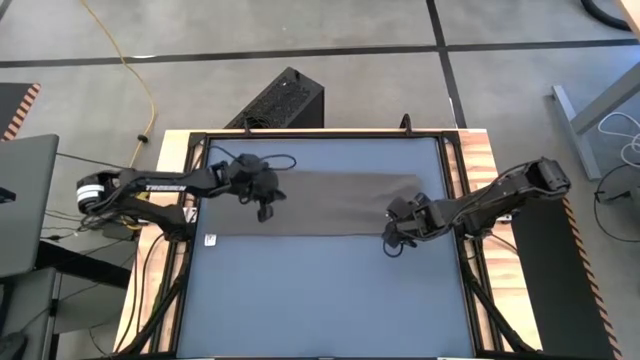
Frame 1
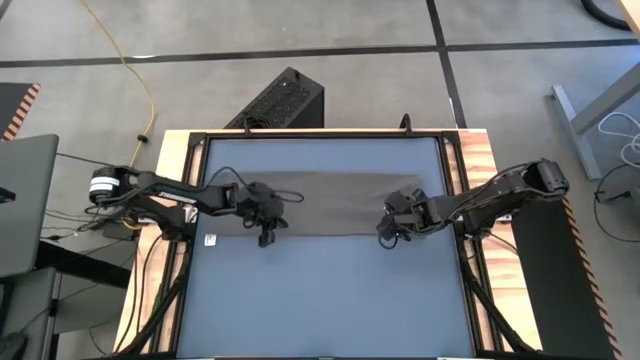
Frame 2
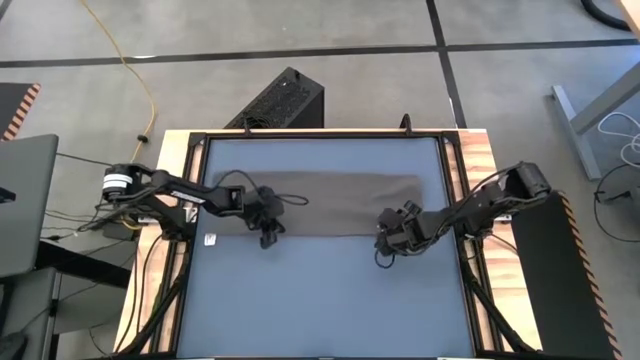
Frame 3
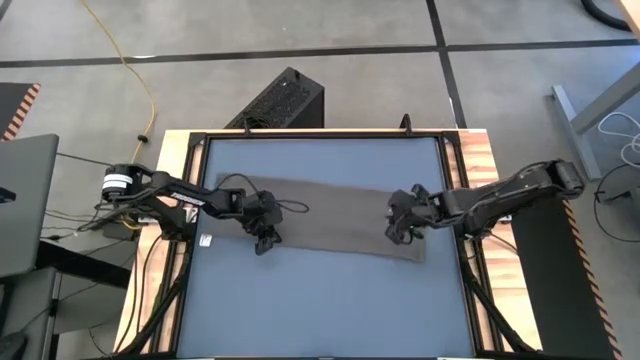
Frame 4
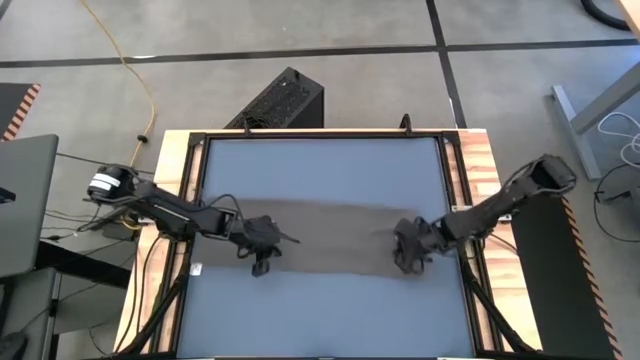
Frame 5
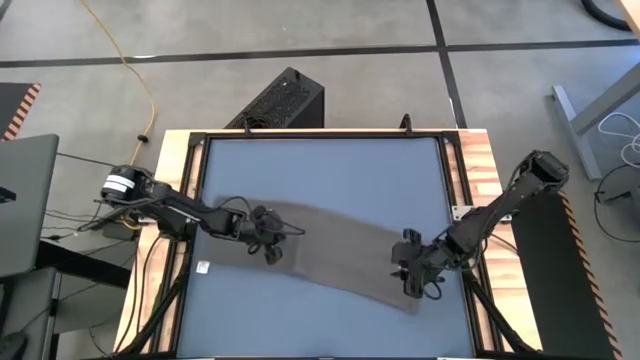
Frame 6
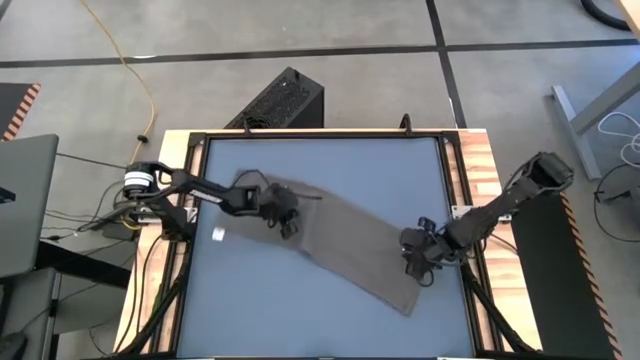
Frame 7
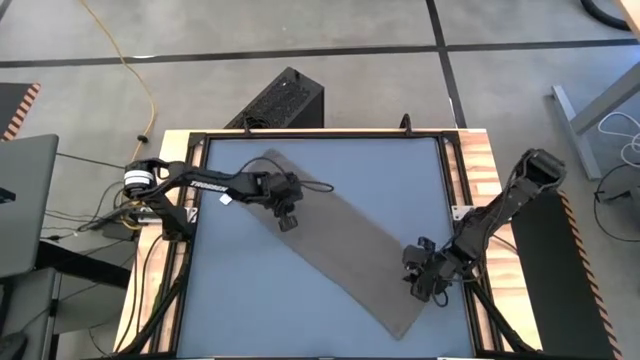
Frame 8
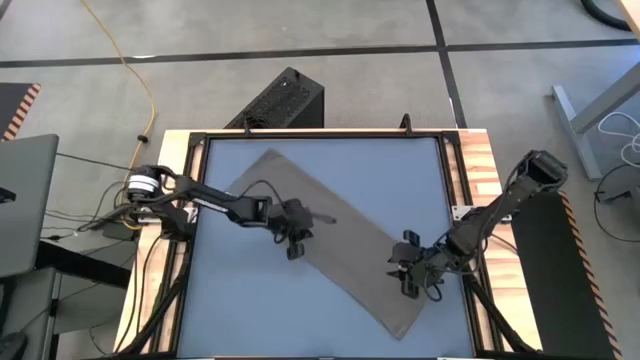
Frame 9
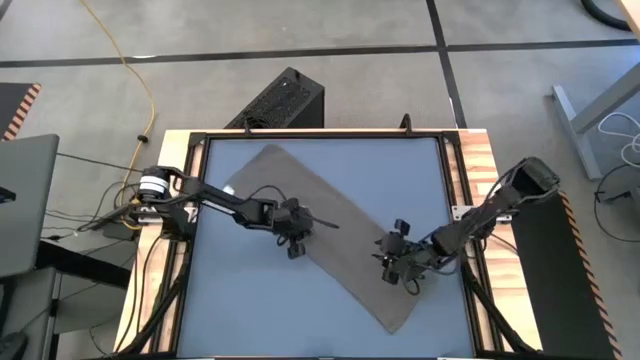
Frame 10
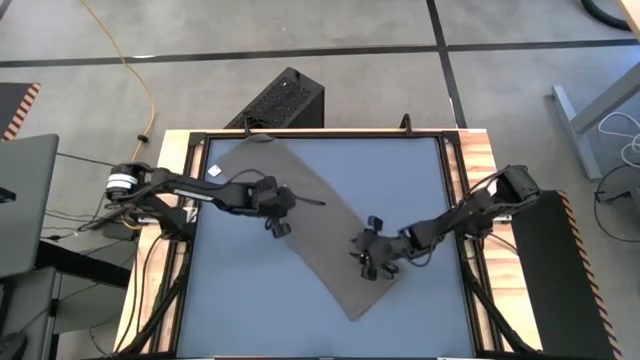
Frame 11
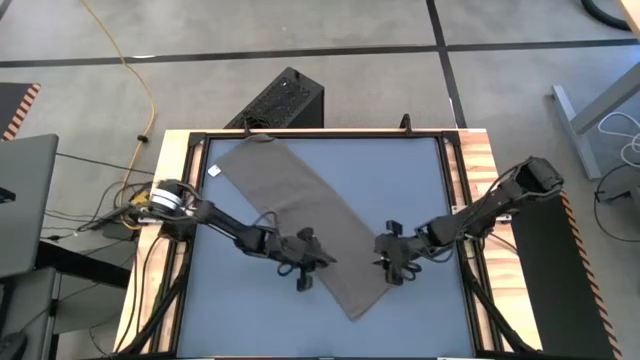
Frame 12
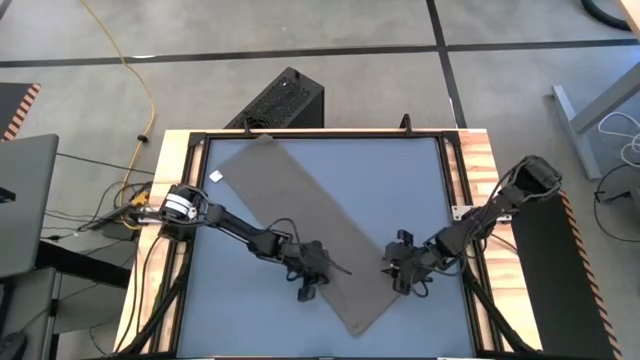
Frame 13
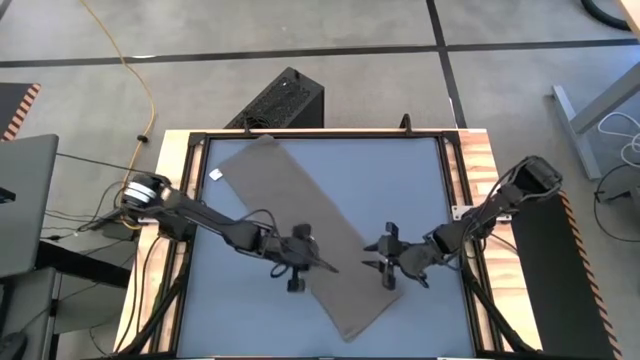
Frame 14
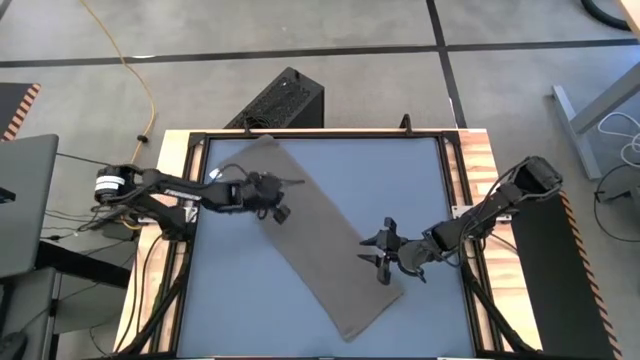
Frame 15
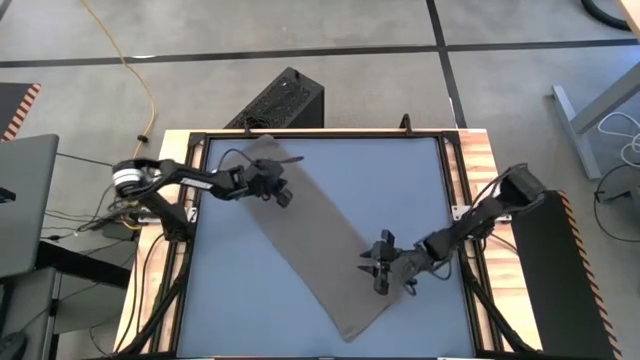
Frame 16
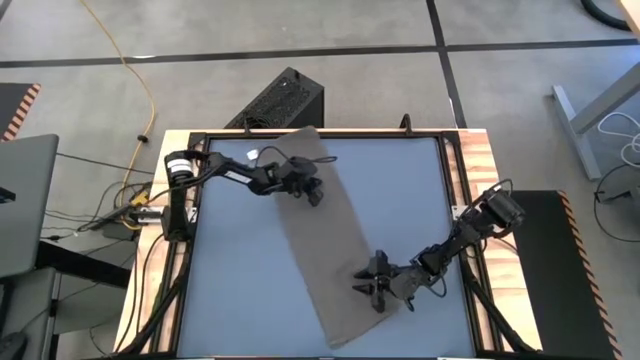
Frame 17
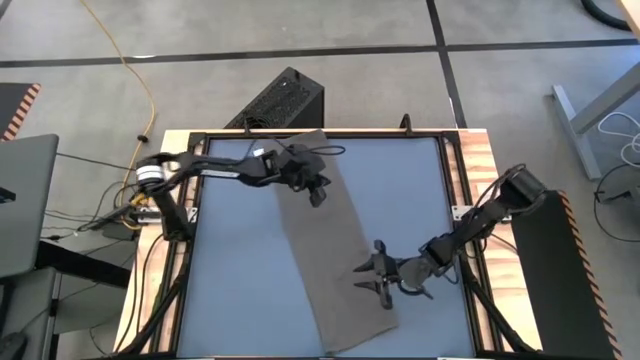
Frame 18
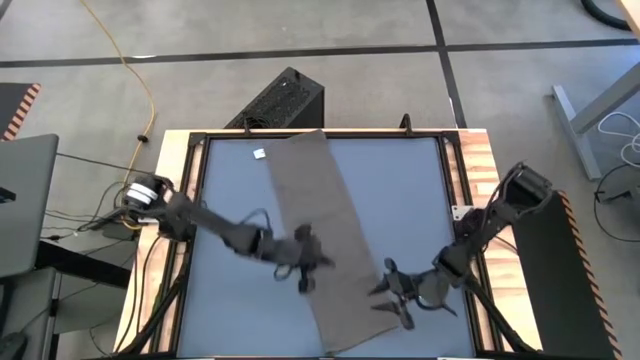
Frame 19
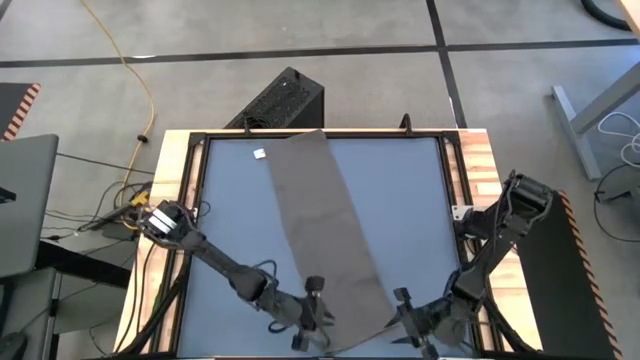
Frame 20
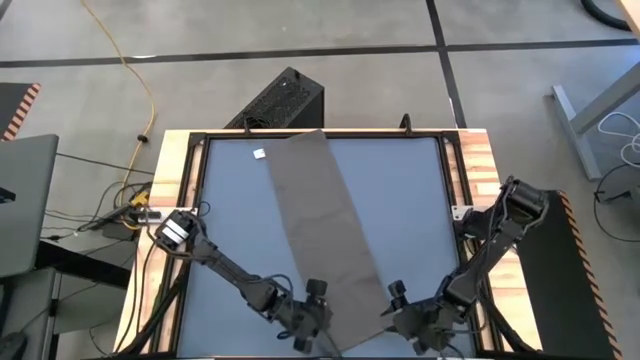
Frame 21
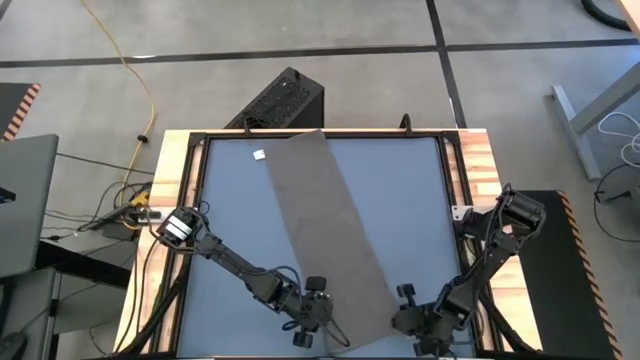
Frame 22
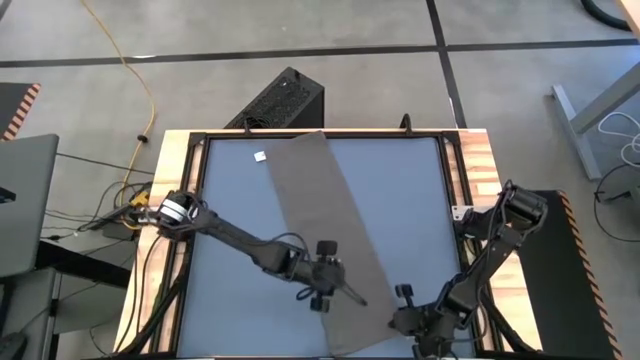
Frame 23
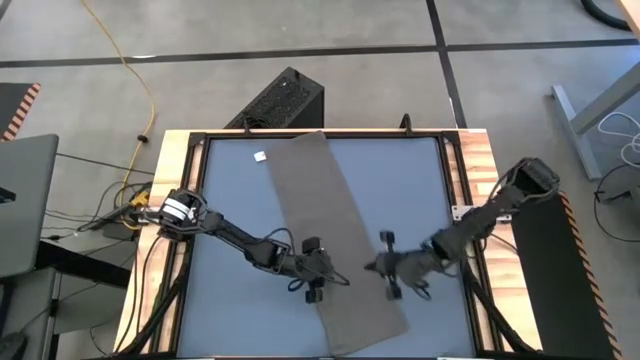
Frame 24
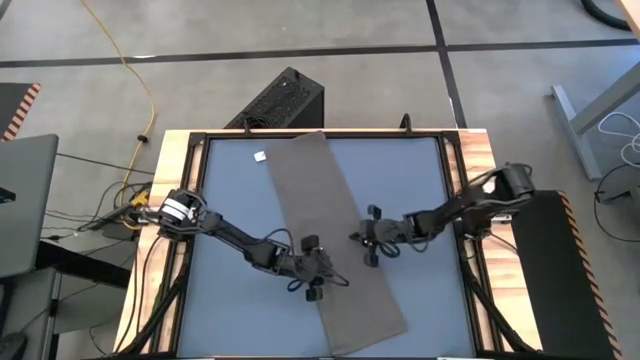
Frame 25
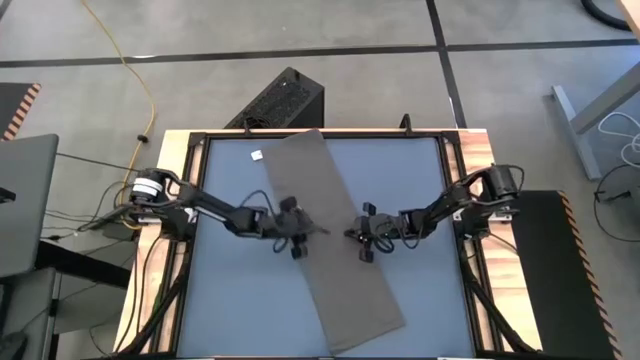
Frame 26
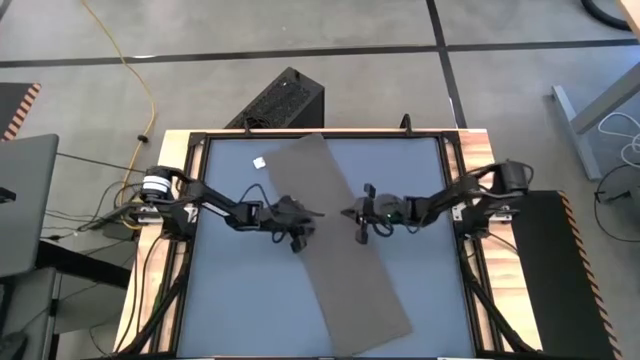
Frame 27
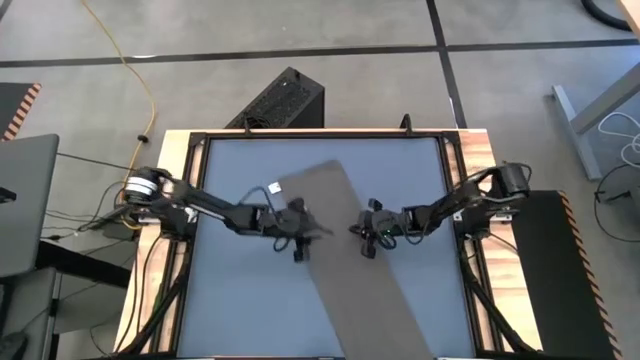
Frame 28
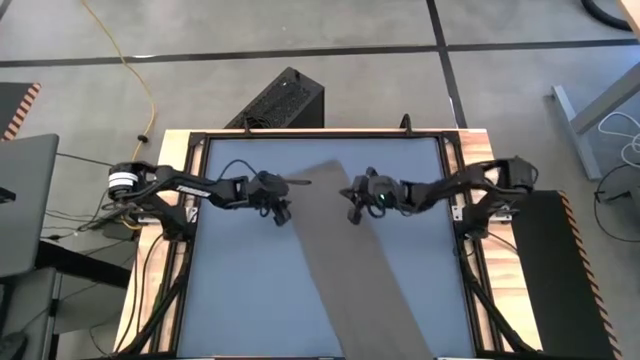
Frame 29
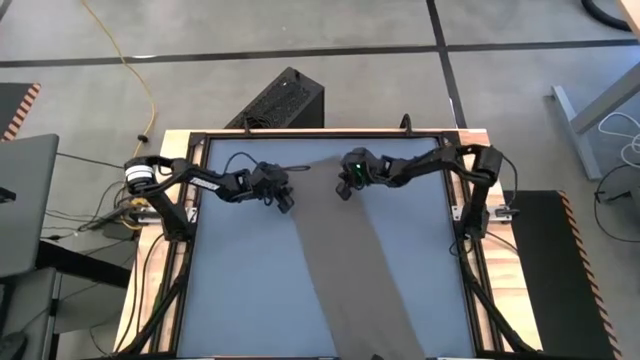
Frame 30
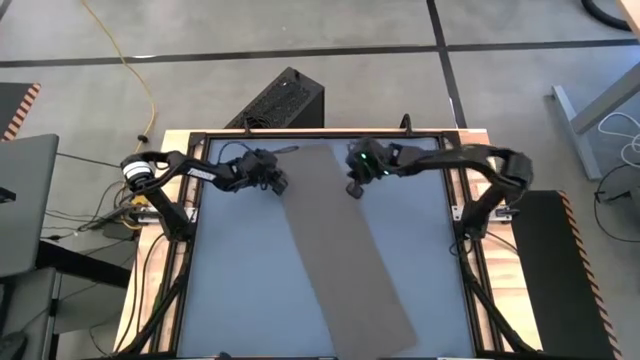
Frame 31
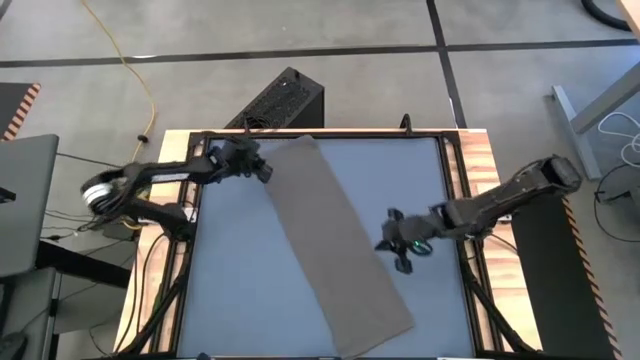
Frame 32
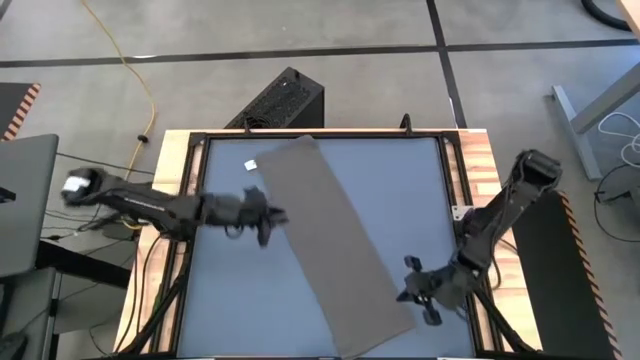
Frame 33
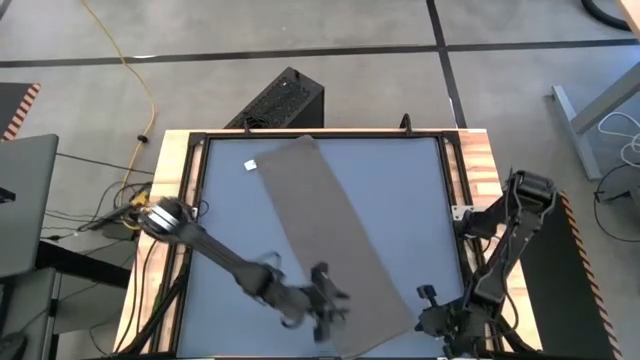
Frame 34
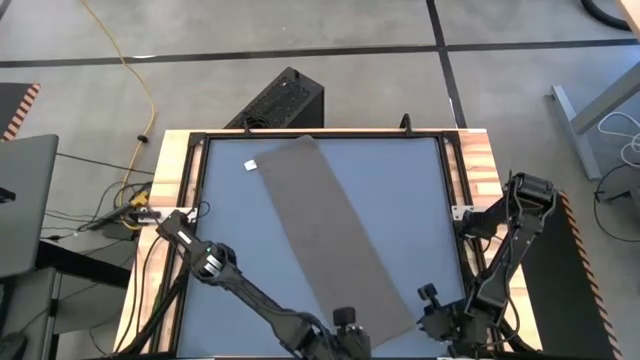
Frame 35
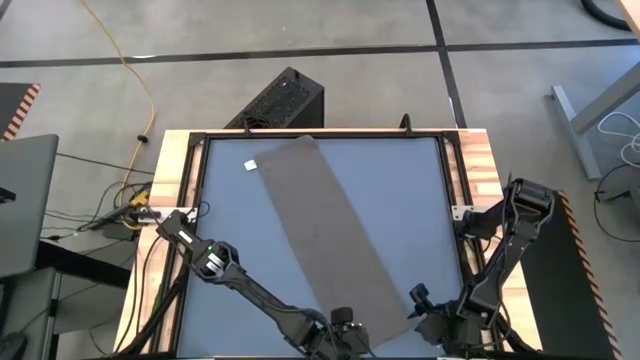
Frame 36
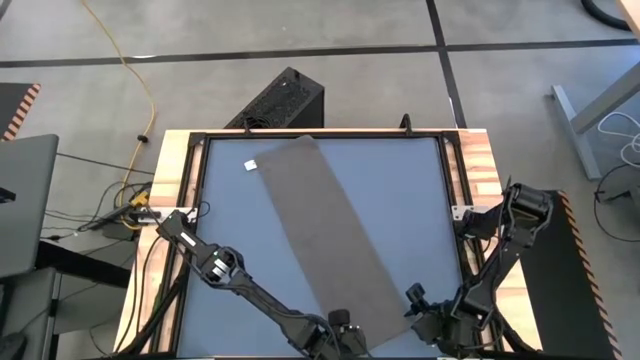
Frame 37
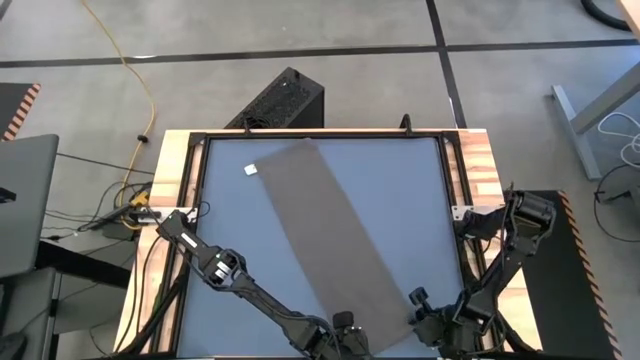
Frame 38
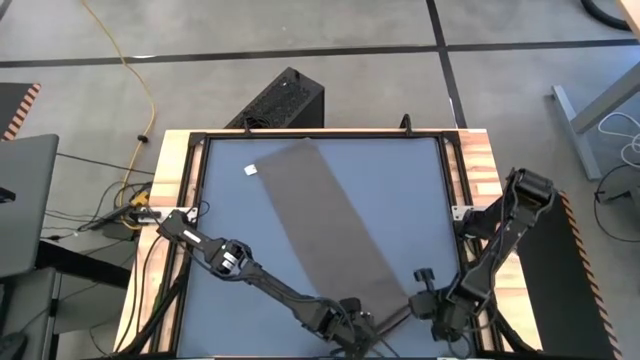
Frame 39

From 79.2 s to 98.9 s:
Task: Roll towel into tight, uniform cylinder
Roll the gray towel

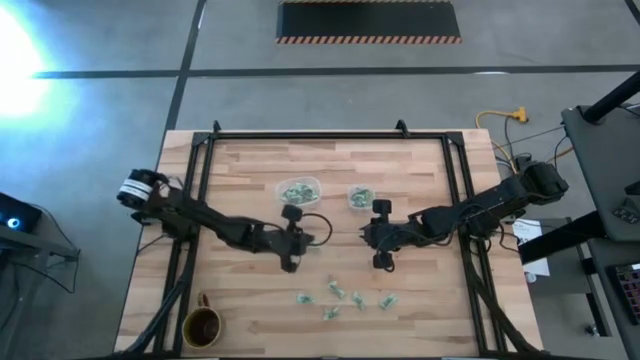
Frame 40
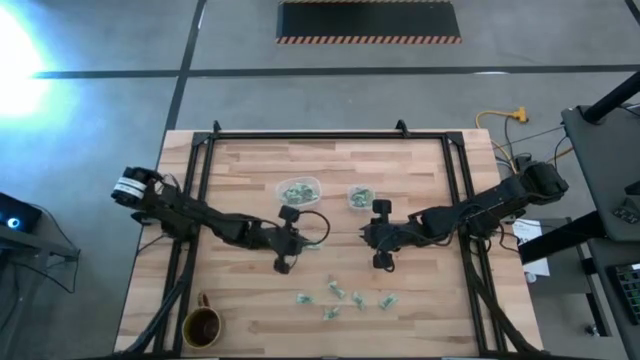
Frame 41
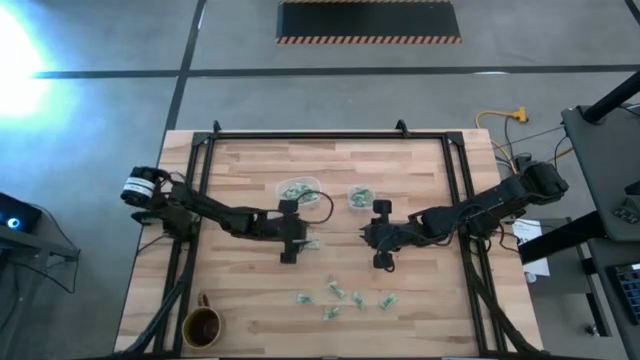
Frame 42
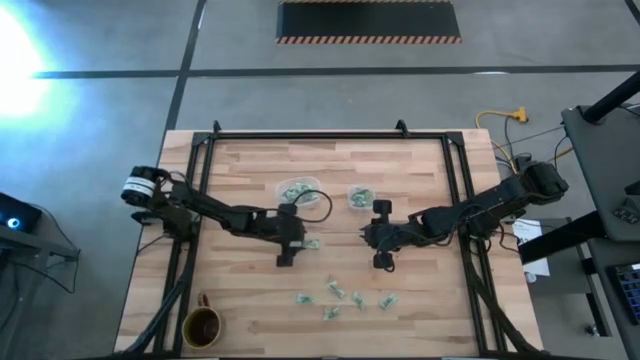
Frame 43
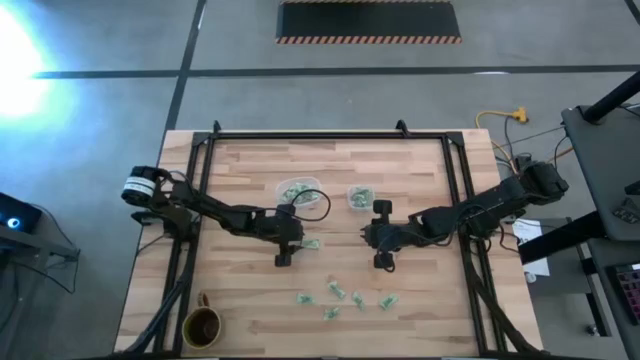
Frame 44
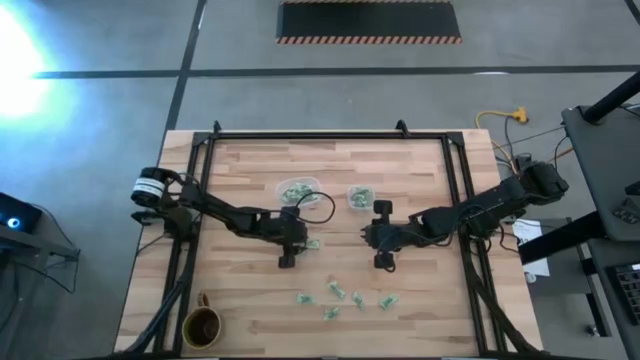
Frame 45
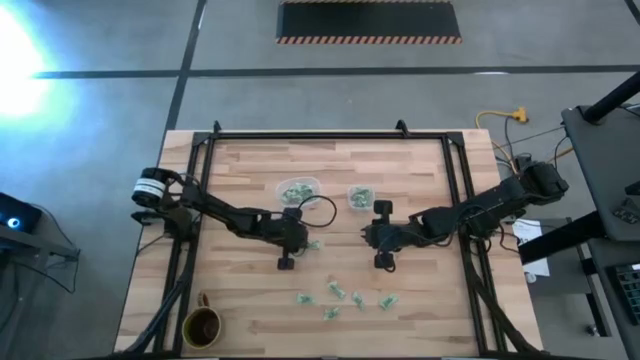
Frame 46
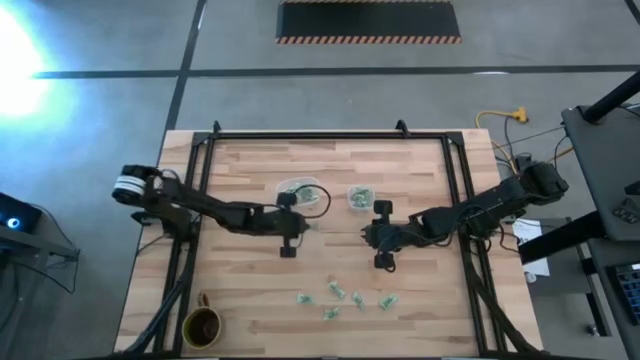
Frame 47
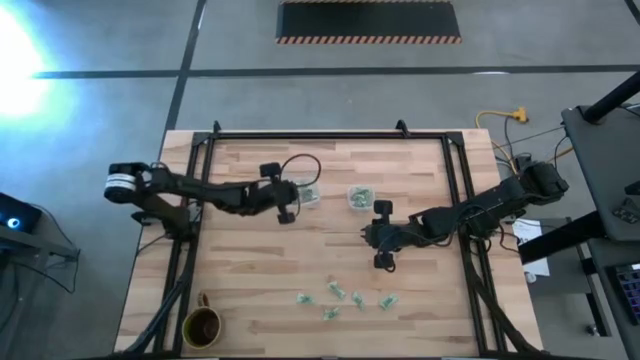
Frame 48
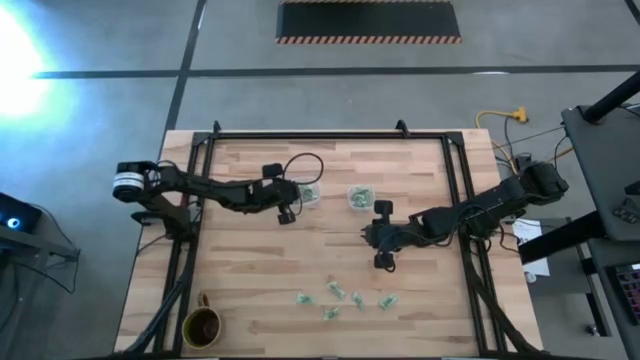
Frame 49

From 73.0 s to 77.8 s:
Task: Pick and place Stevia / Truvia into bins
Put the stevia packet into the transparent oval container
